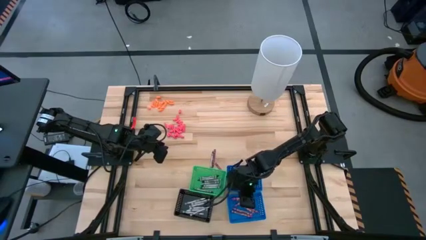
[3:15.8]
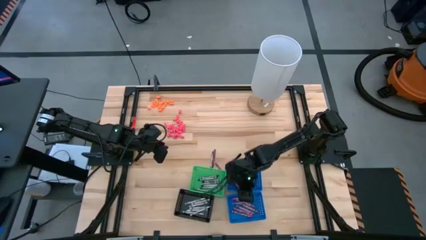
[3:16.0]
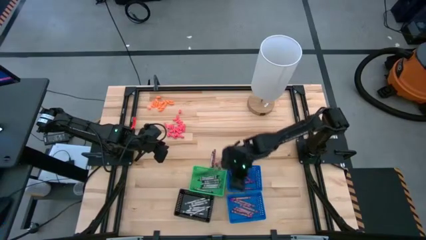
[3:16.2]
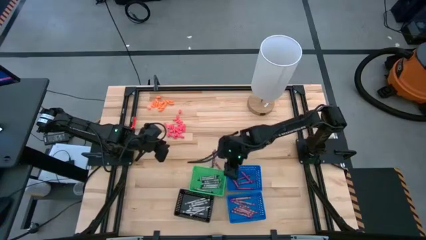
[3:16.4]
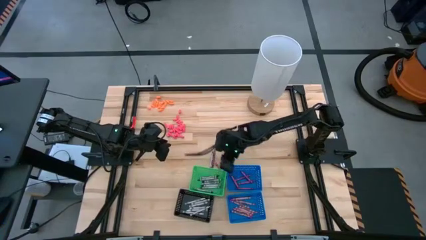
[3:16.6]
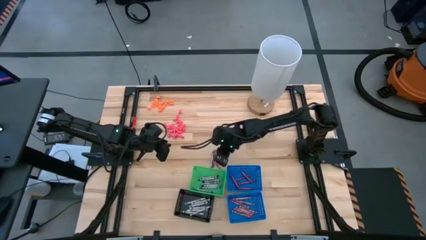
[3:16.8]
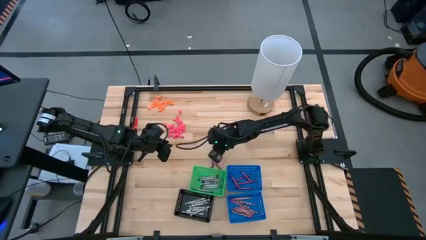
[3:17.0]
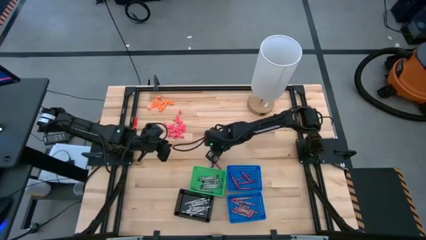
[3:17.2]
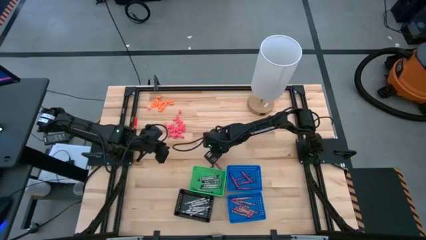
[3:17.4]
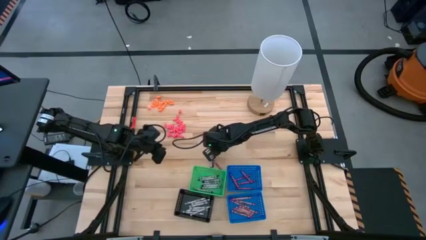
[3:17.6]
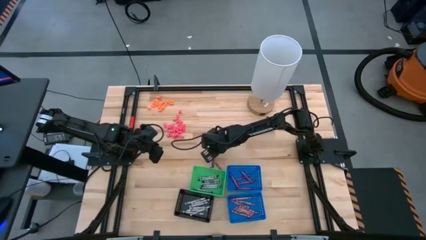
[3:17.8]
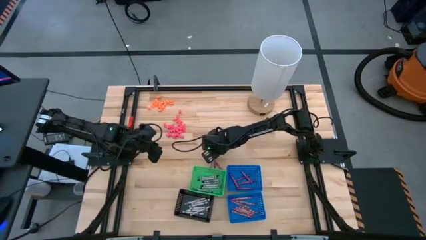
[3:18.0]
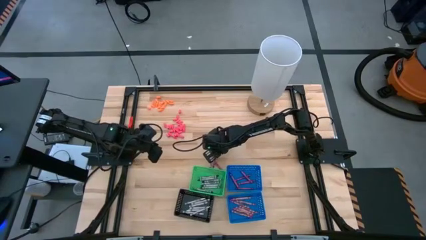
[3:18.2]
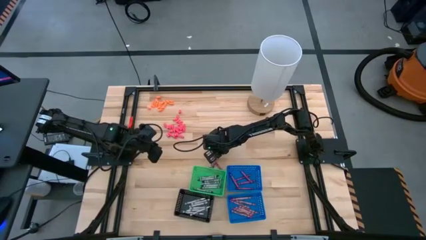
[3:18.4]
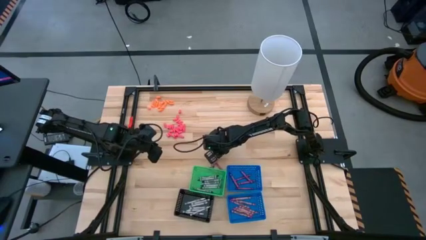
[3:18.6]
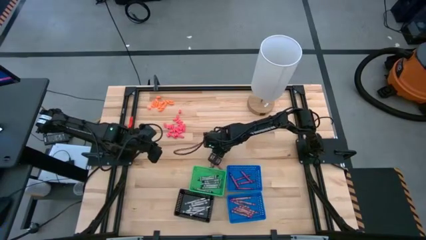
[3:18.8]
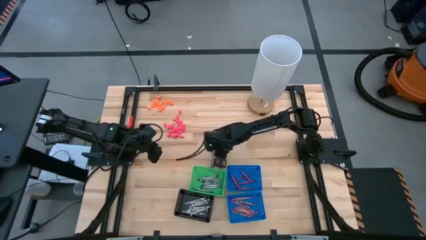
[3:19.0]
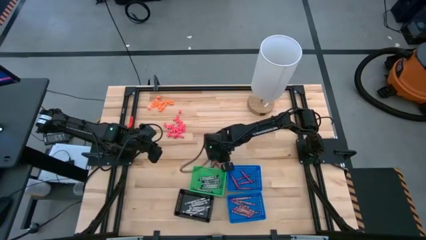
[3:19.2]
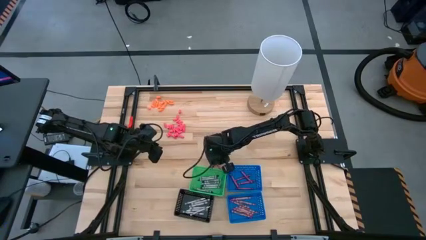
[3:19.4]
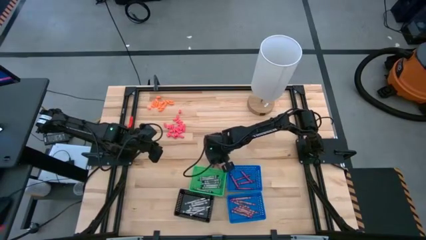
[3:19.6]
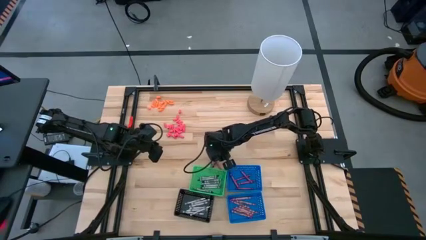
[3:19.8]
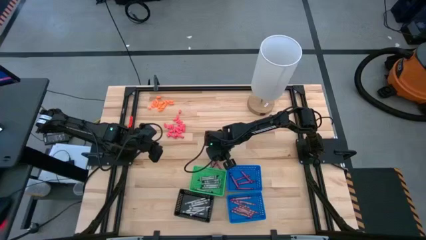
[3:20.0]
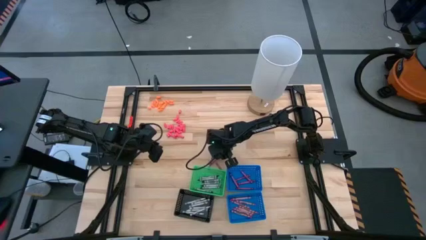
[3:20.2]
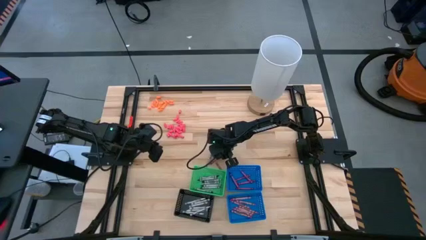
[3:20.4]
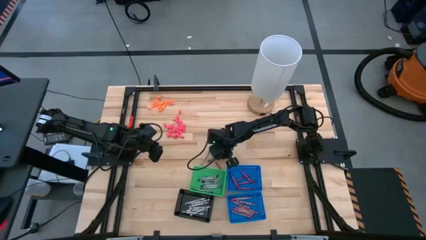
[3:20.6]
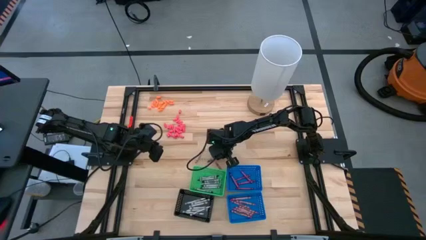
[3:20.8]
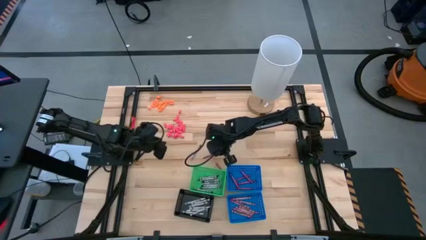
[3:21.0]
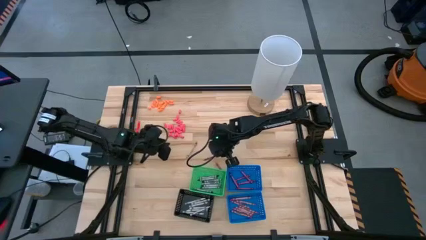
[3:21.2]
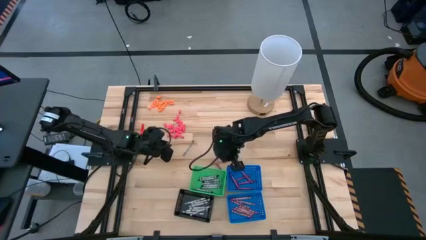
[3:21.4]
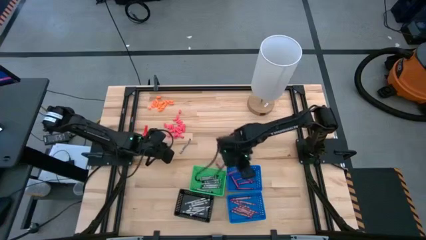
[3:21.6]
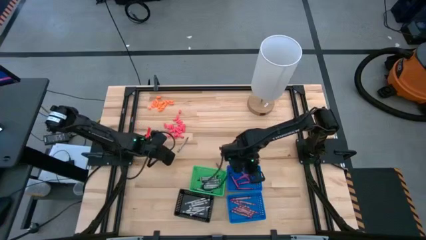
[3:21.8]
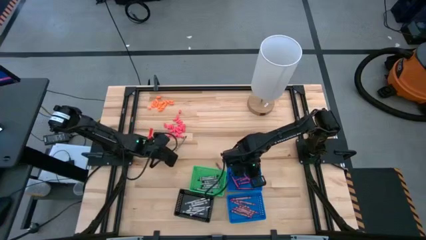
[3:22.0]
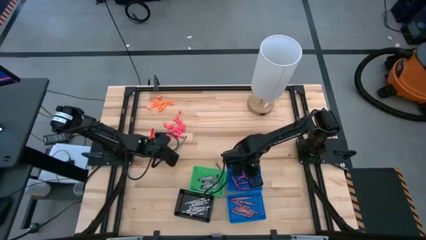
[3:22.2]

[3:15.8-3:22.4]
Task: Sort crayons
Put the violet crayon into the top blue bin

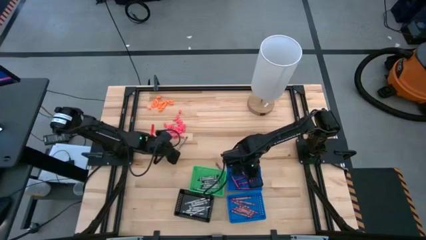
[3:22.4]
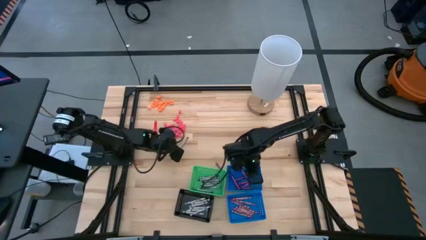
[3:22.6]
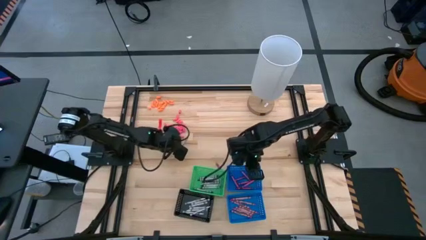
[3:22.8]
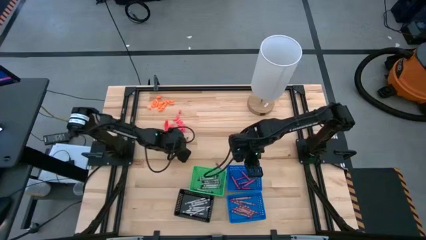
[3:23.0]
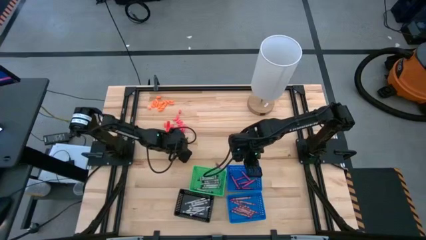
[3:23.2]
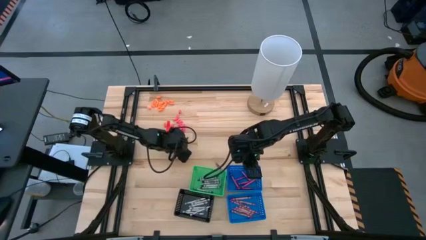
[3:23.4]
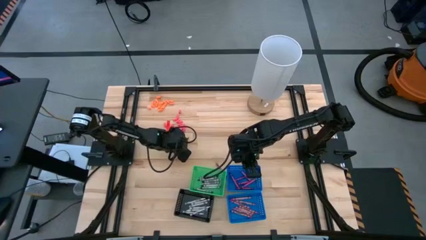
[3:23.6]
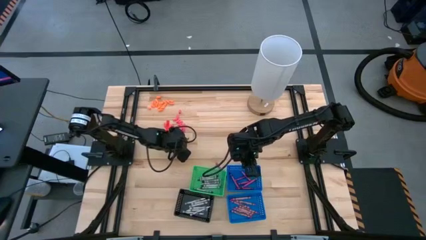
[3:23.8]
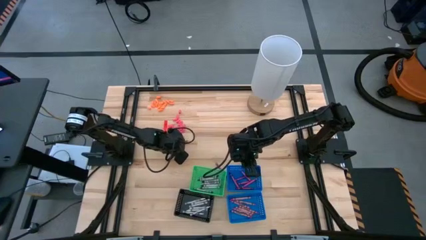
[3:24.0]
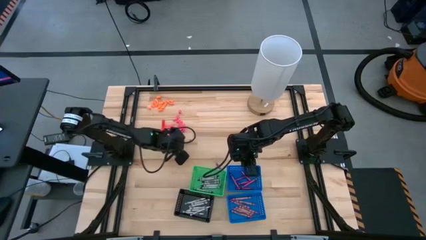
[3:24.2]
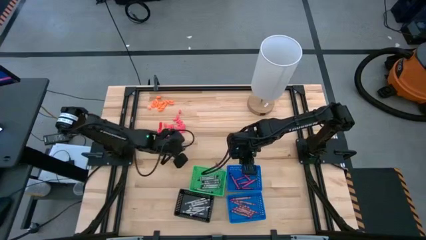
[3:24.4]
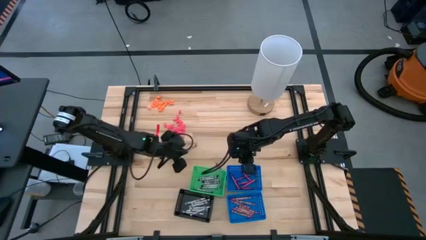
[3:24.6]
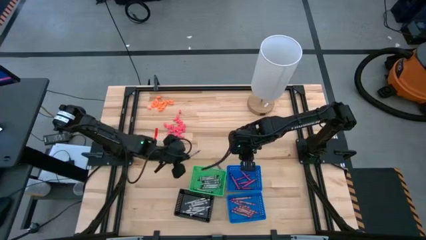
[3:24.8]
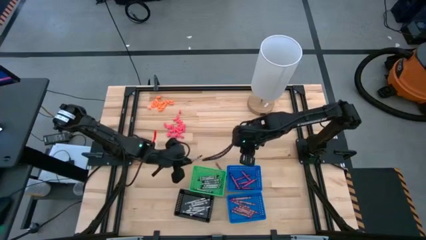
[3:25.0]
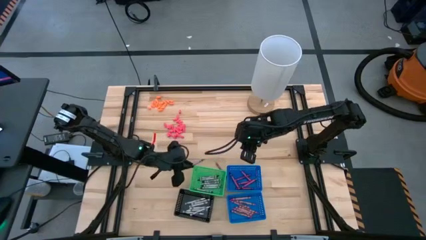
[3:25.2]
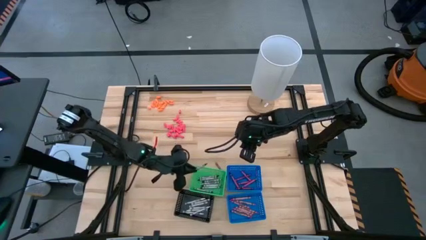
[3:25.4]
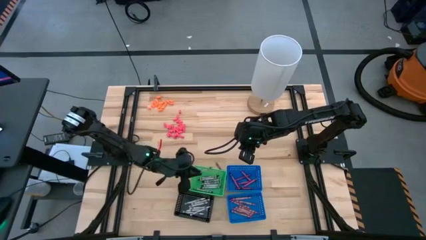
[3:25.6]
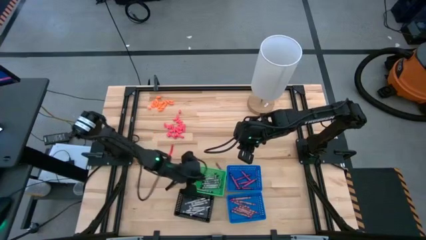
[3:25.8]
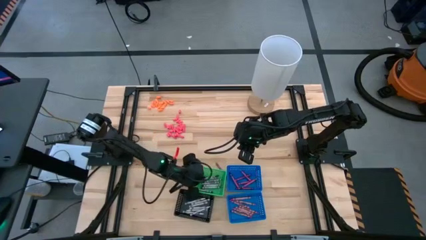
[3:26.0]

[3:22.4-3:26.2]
Put the black crayon into the green bin

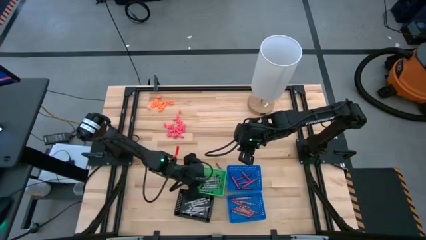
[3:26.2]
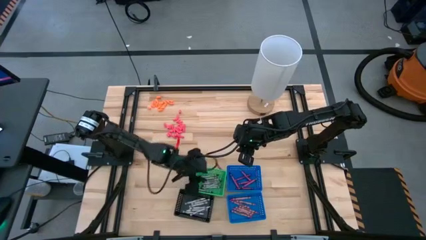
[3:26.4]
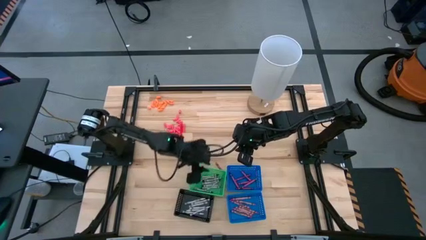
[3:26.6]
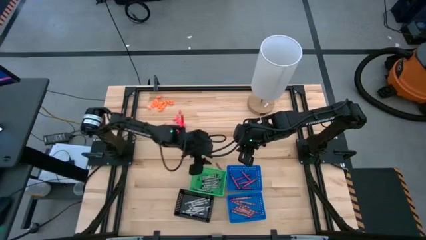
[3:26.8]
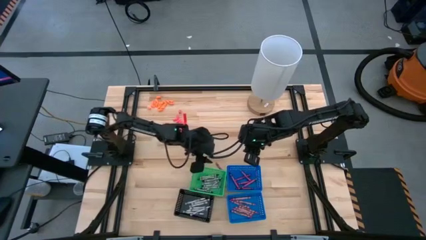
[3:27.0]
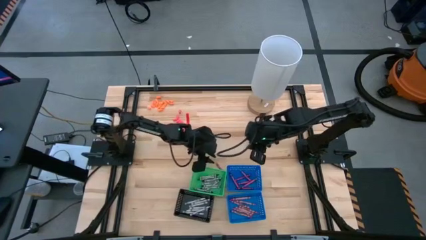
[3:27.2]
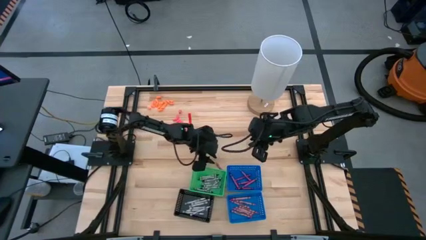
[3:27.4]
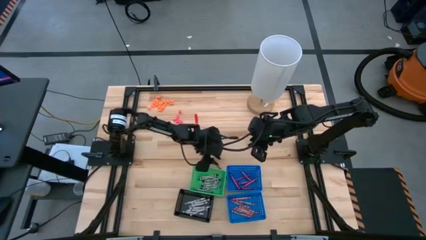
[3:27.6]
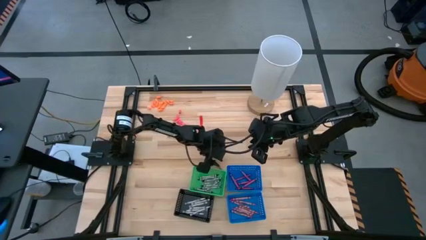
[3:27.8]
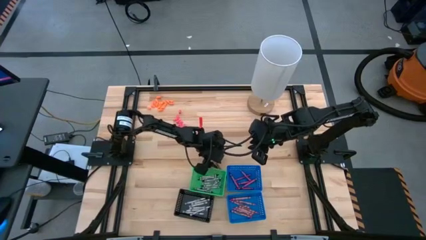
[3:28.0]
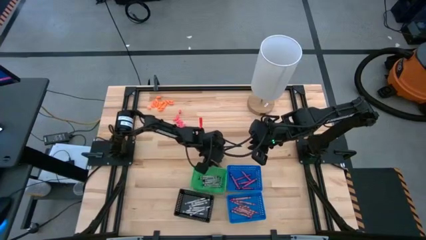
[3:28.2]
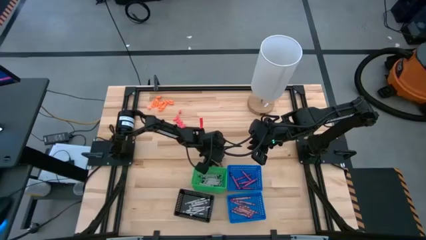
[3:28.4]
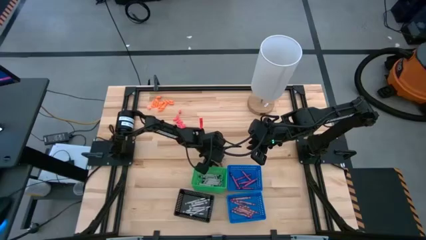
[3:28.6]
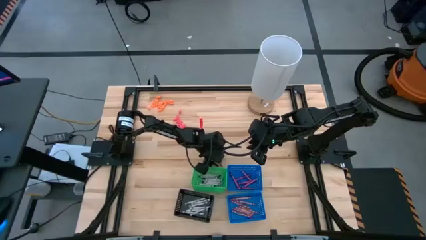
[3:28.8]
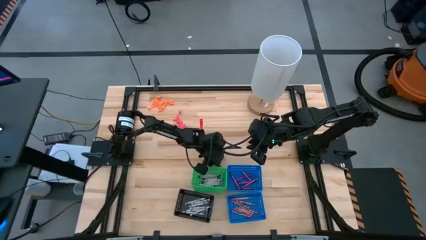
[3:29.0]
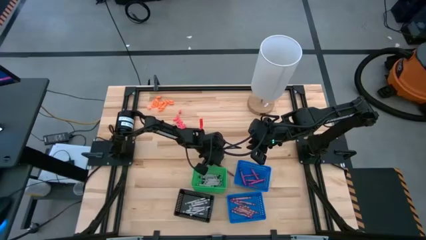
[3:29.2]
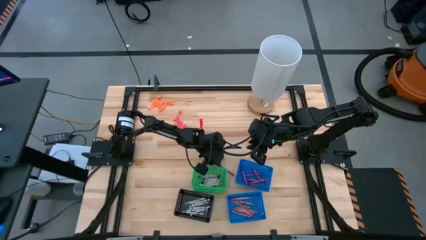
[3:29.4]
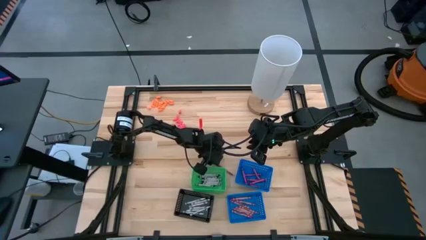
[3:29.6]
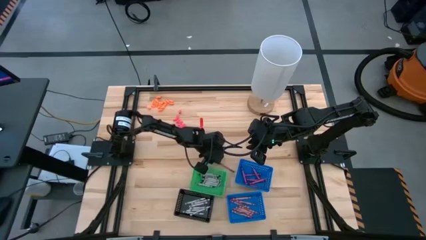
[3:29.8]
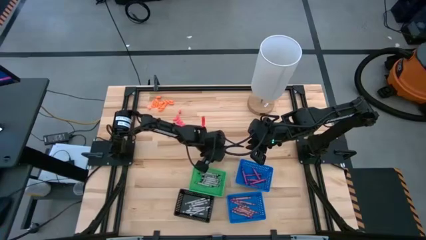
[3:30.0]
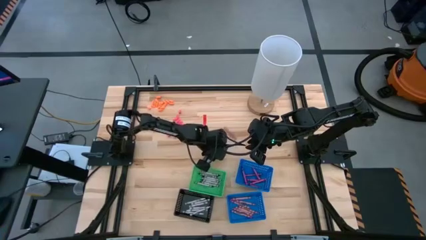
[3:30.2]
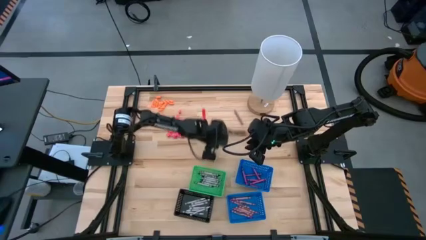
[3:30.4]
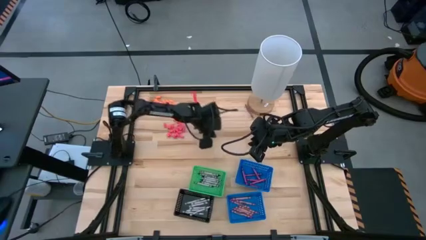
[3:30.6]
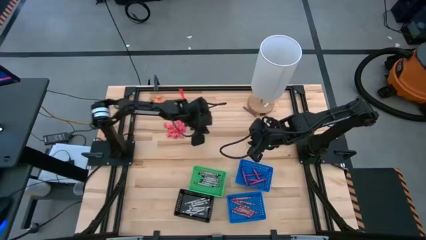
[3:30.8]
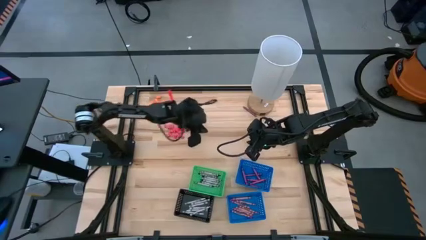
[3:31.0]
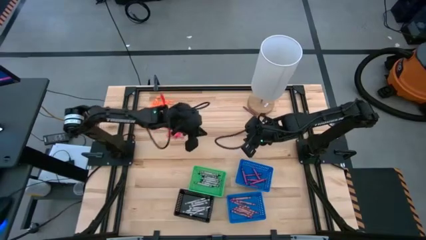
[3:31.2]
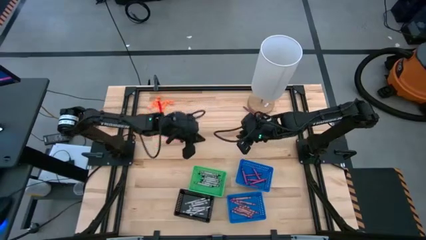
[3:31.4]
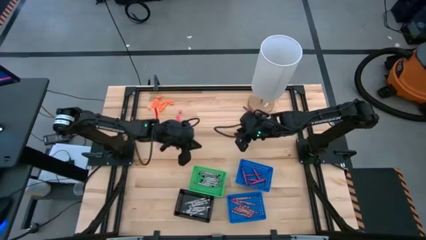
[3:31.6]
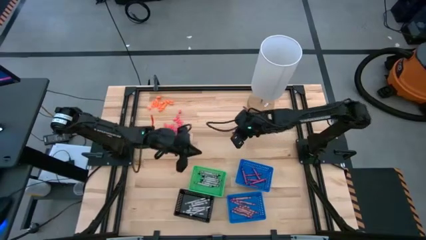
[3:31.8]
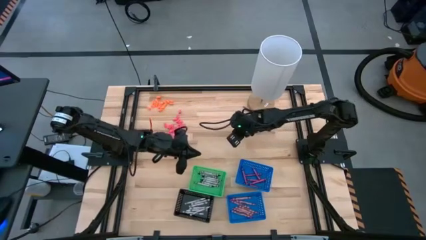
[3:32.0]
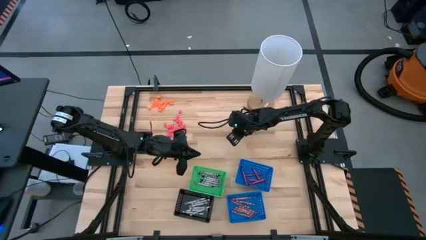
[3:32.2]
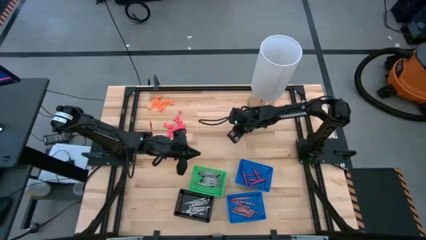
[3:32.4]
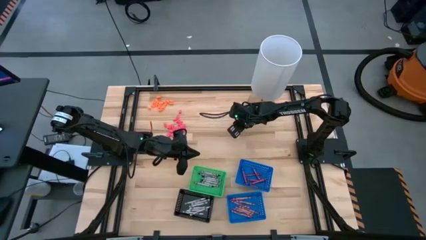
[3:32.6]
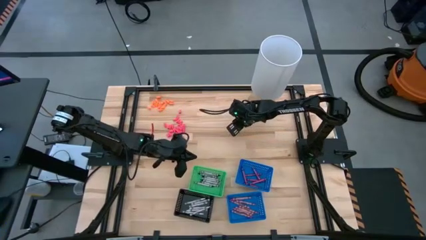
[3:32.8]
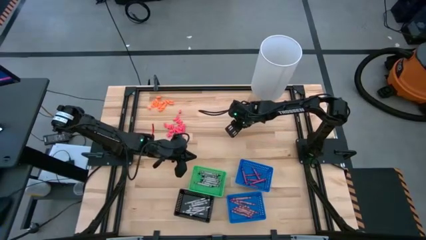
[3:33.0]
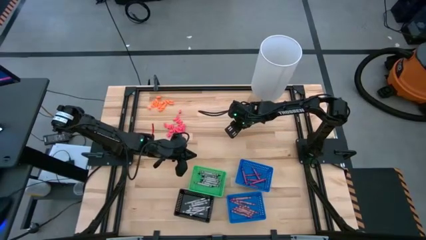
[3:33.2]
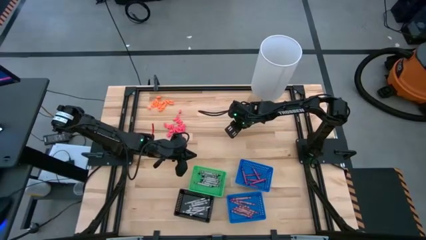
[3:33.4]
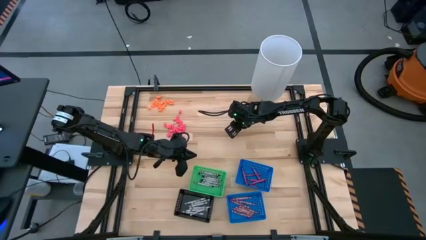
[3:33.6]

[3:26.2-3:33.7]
Put the violet crayon into the top blue bin
